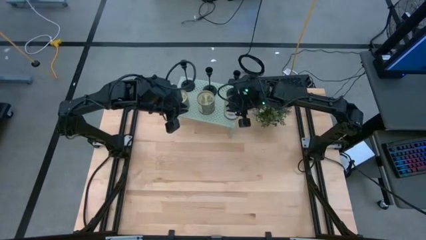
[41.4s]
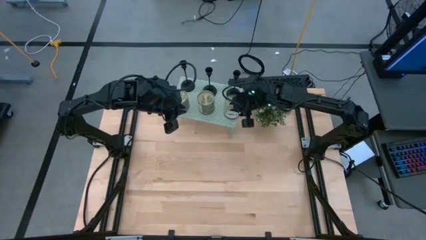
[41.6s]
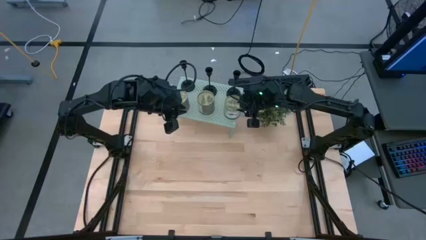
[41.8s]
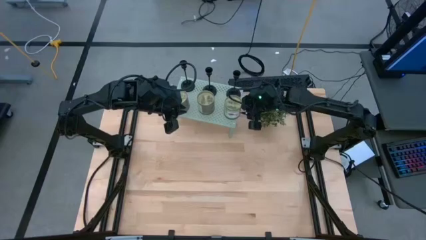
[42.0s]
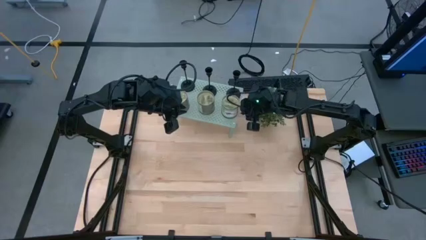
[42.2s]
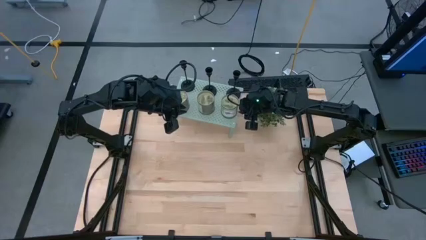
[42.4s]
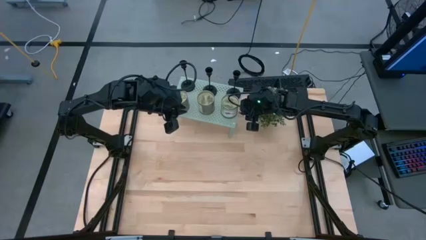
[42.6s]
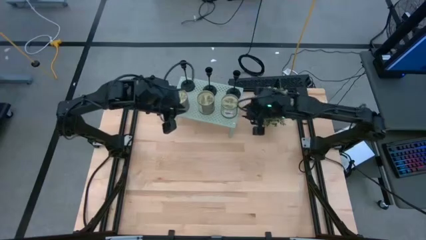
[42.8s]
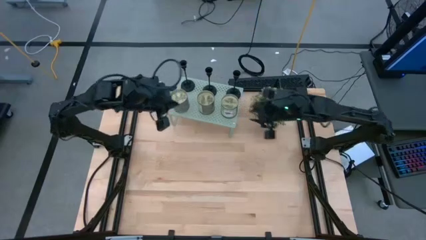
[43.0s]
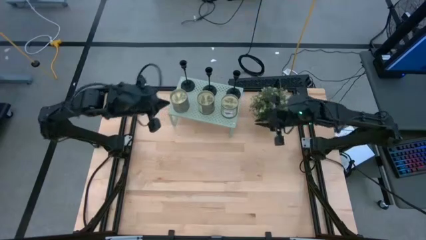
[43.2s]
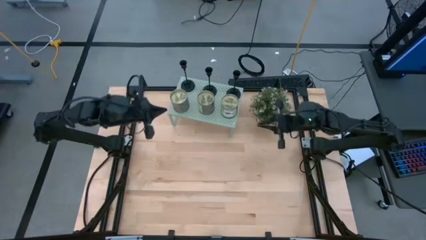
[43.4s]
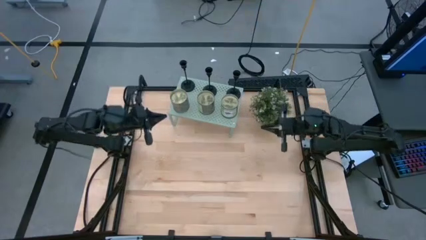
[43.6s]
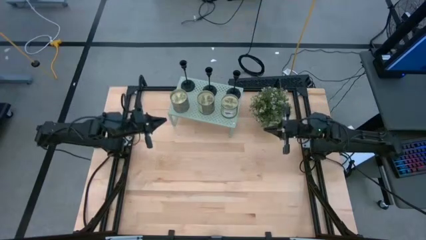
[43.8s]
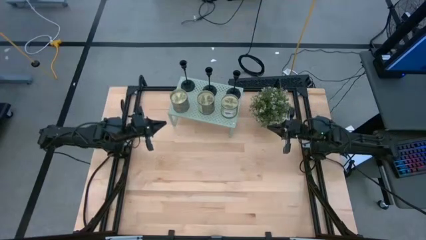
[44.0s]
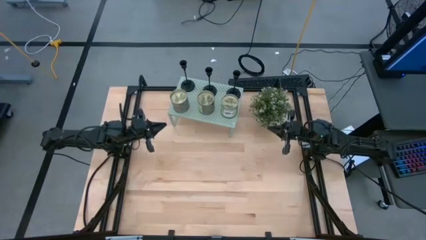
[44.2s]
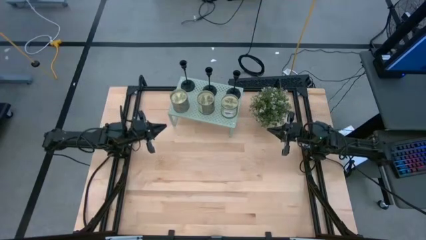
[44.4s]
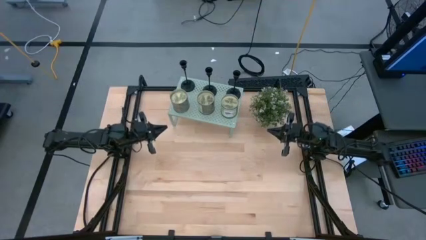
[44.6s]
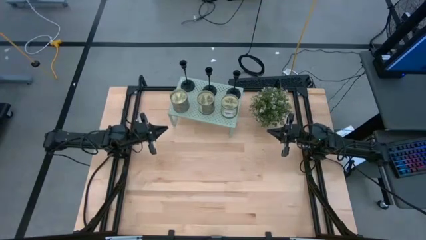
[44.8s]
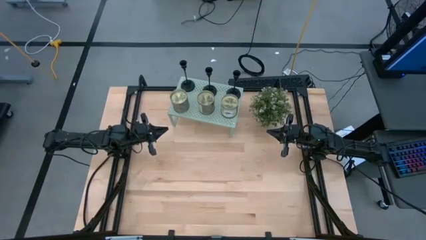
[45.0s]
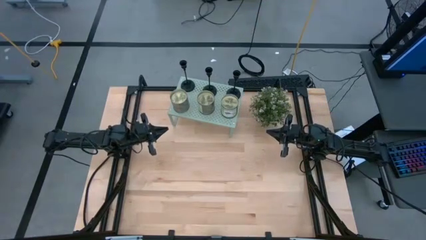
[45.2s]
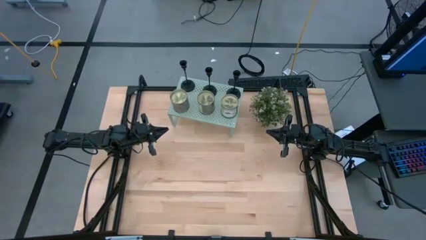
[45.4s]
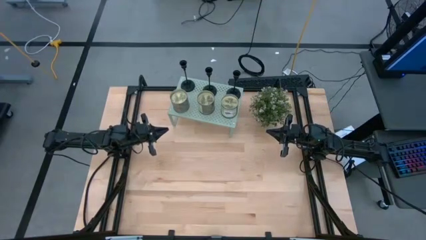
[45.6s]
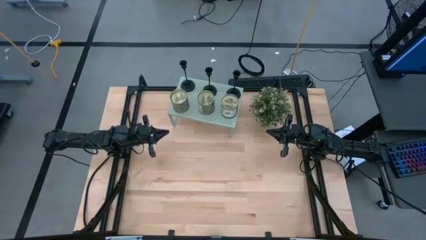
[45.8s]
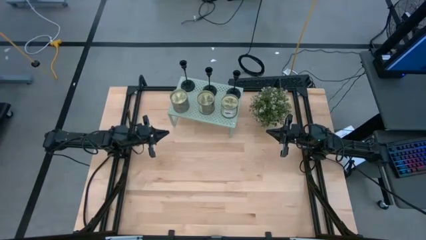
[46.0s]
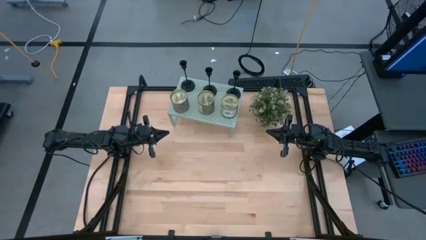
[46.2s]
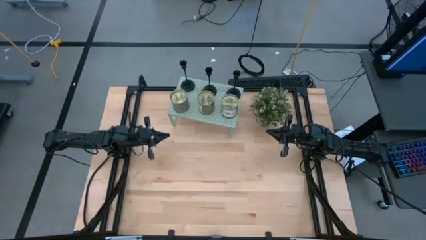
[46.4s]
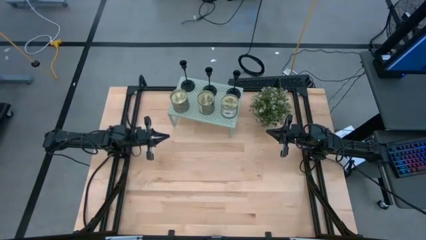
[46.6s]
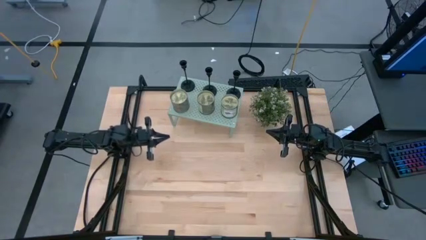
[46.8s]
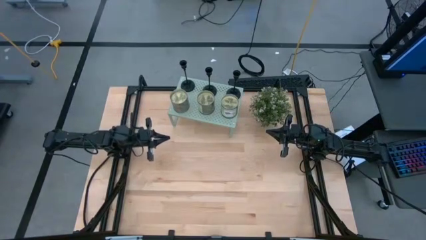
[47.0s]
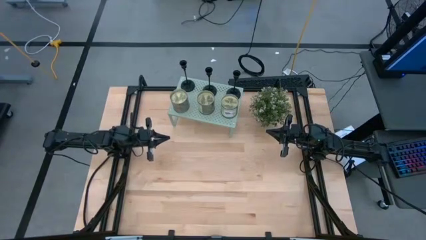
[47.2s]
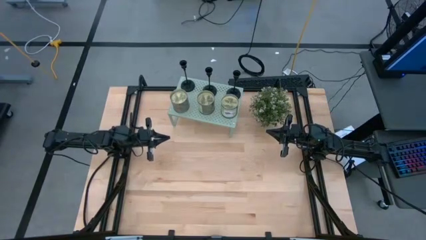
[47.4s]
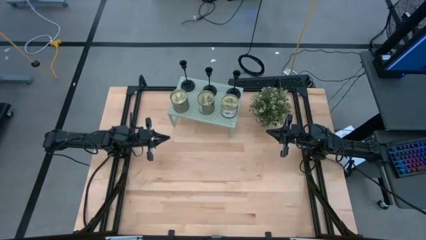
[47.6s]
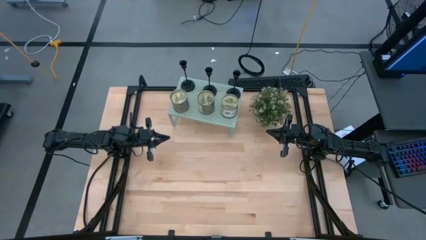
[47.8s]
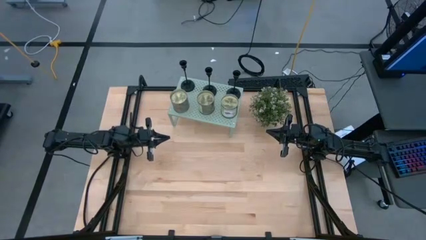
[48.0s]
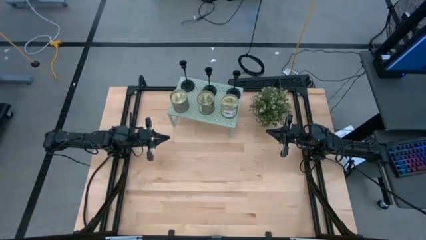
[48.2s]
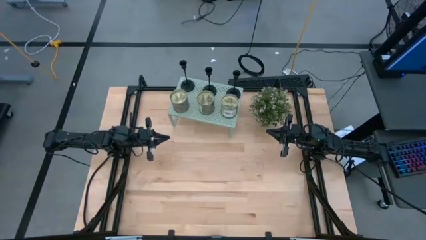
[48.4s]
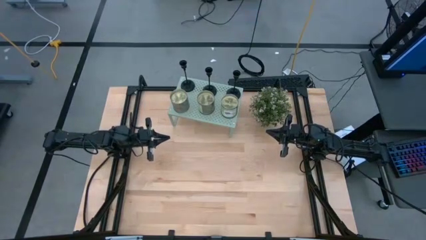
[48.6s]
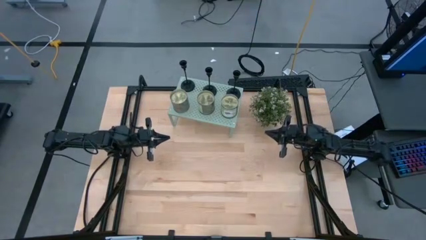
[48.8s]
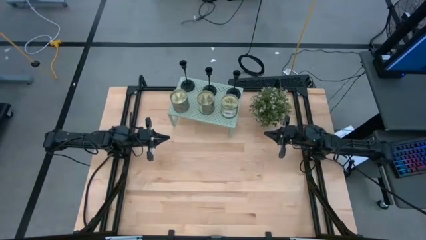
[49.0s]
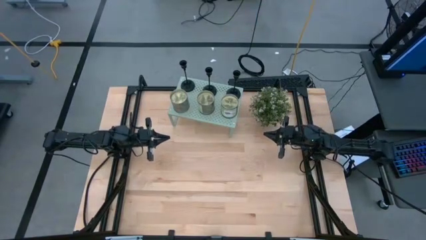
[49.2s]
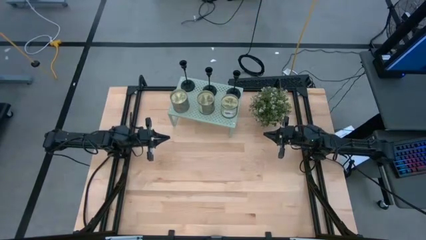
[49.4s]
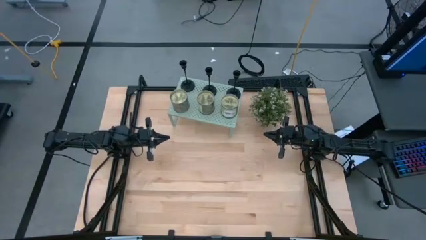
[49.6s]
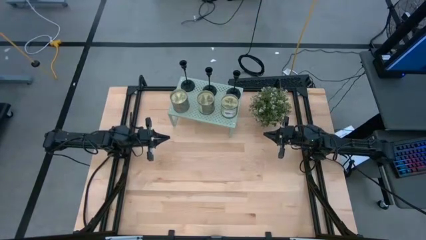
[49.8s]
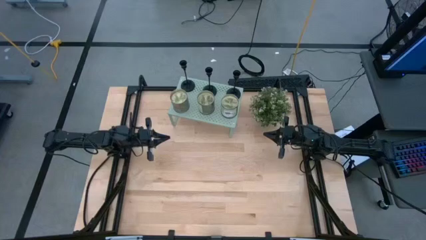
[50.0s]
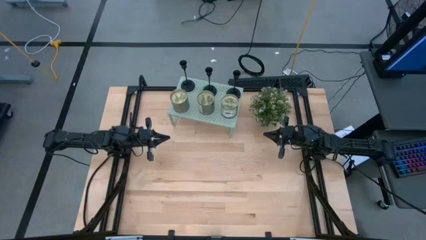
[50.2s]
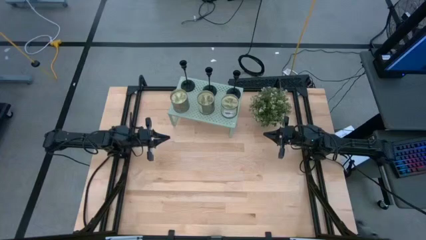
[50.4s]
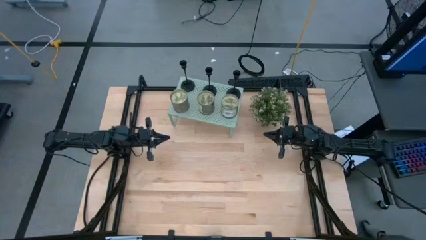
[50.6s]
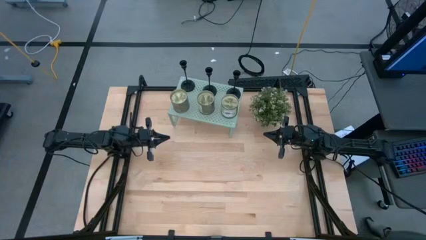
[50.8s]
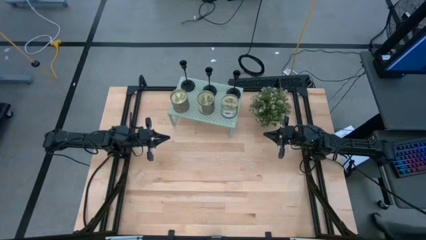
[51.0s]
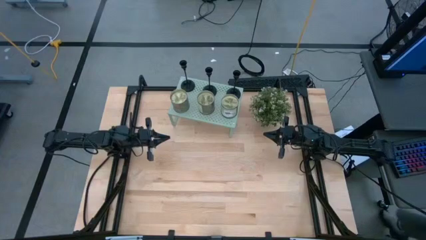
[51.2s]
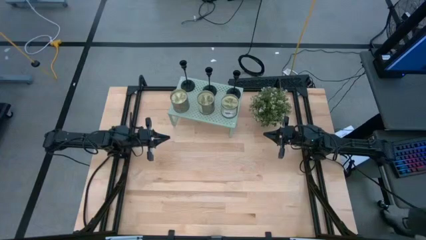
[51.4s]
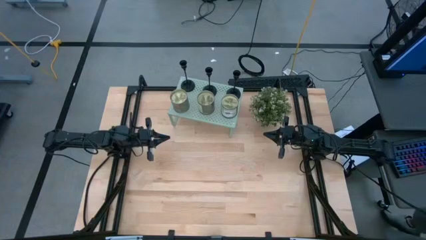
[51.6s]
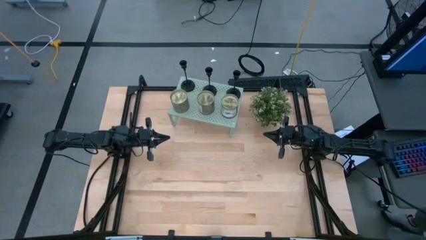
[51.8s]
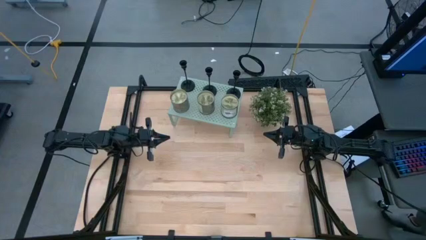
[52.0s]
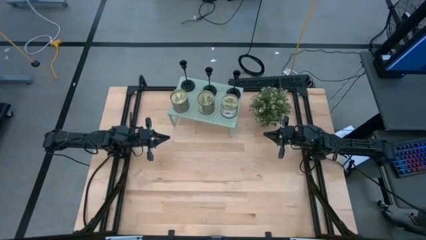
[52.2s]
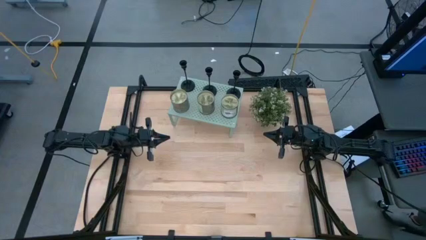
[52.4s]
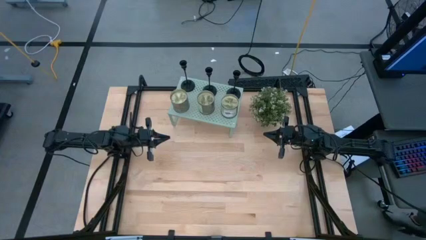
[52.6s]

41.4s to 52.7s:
Task: Pick & Place candle stick holders
Return to Home Position
